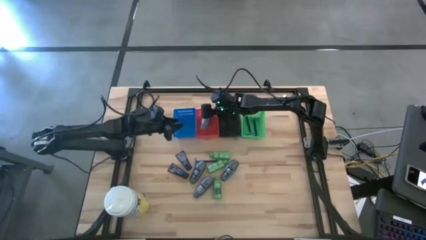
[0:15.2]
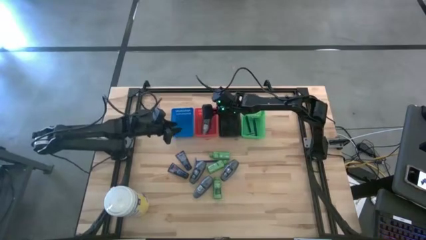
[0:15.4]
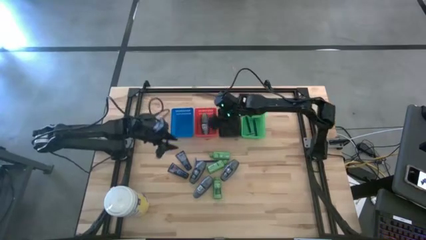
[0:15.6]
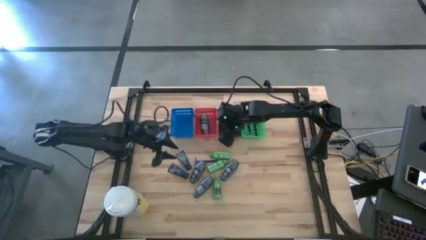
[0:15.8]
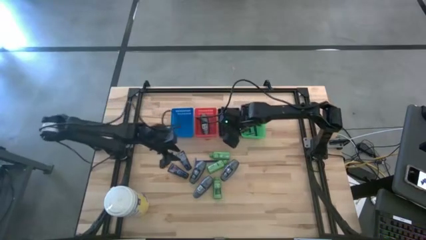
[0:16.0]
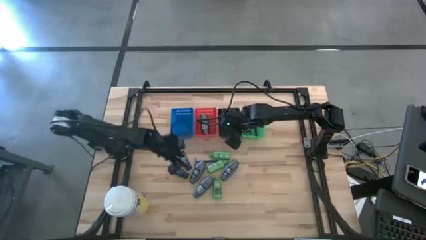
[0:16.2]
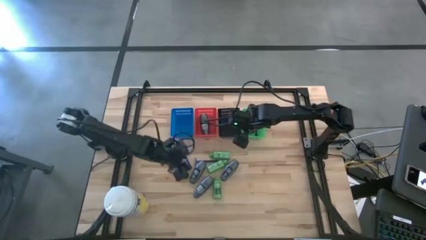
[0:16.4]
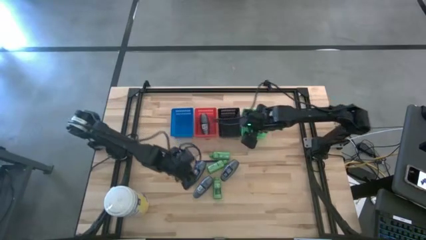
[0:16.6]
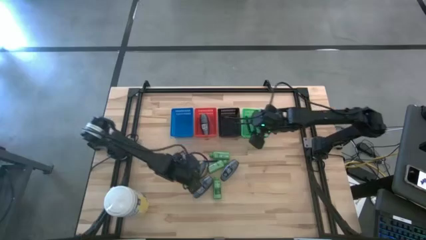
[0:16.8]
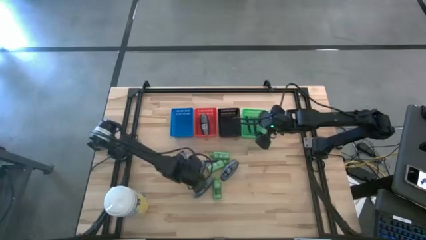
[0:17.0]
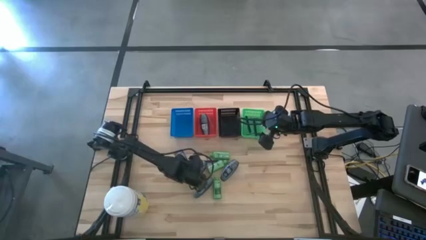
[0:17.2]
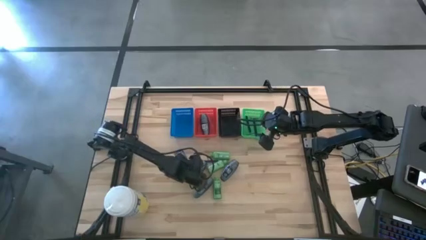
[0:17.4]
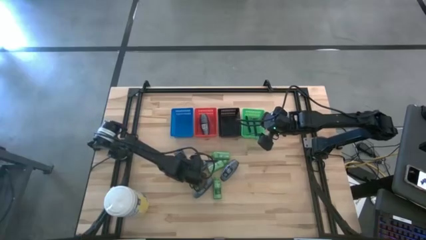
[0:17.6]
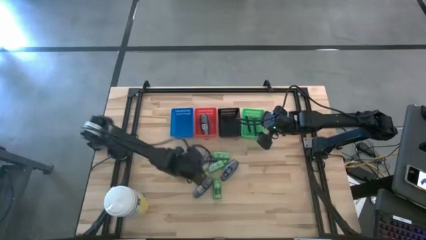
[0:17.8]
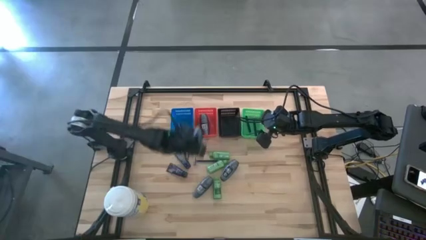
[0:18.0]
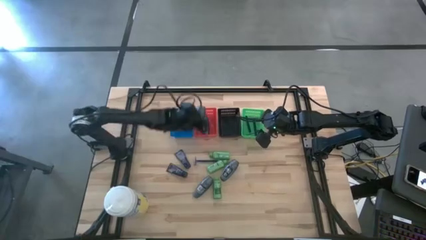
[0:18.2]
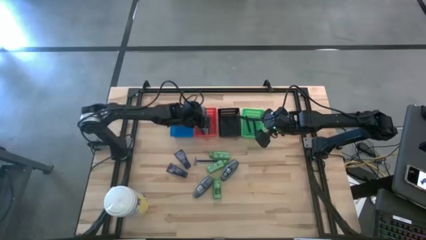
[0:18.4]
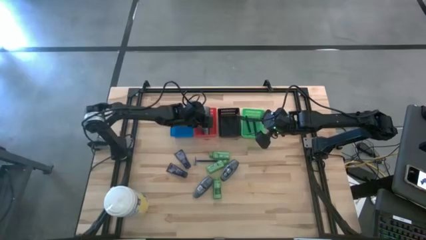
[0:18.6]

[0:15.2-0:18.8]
Task: Pick & Place Travel size toiletries
Put the gray deodorant into the red bin

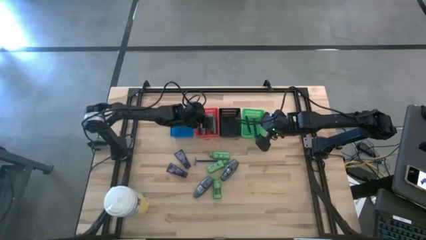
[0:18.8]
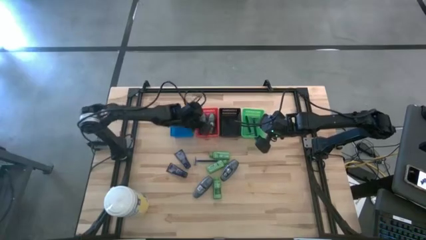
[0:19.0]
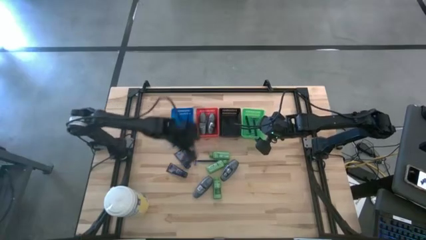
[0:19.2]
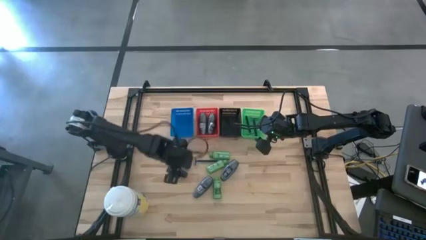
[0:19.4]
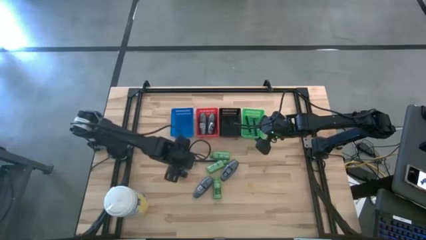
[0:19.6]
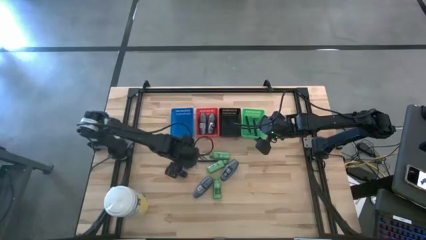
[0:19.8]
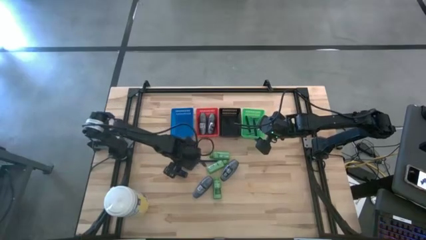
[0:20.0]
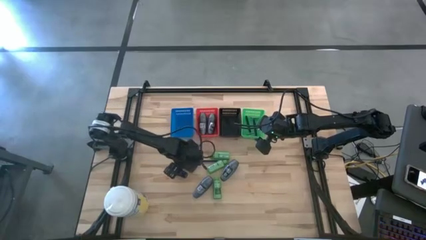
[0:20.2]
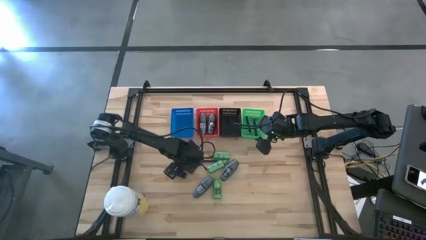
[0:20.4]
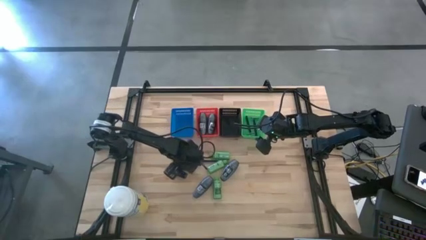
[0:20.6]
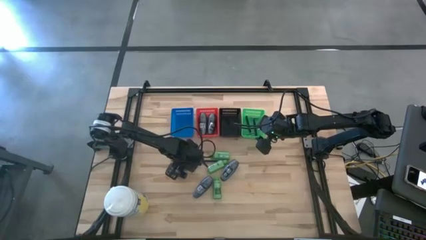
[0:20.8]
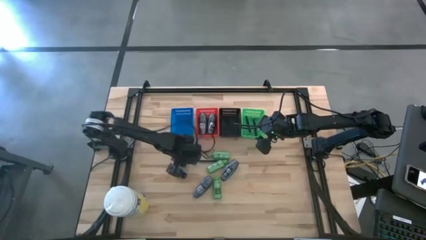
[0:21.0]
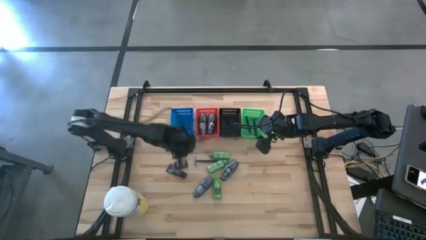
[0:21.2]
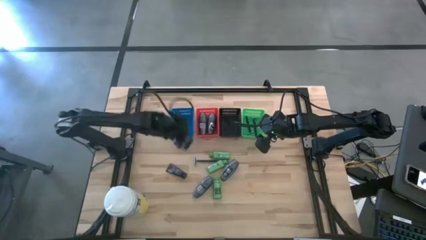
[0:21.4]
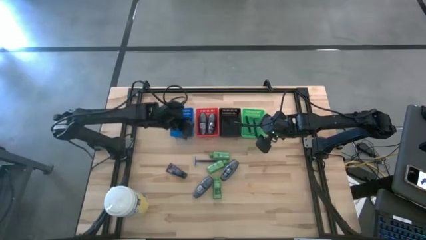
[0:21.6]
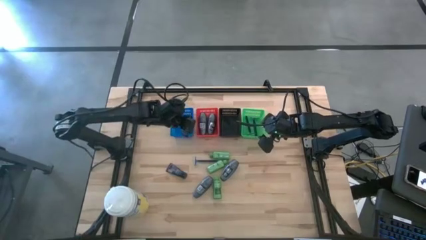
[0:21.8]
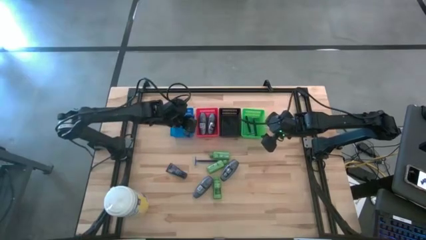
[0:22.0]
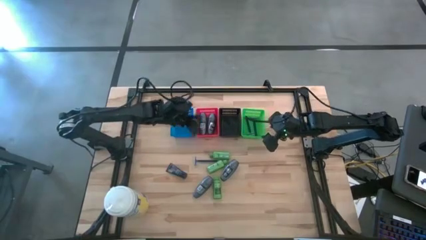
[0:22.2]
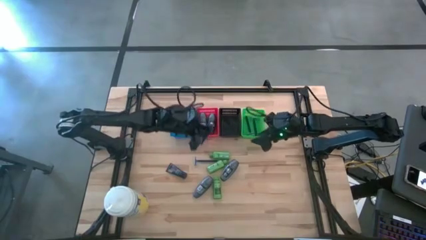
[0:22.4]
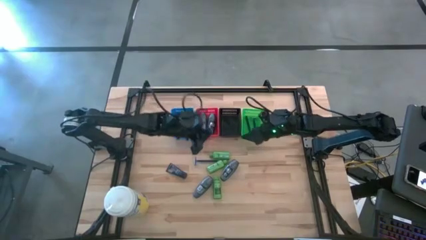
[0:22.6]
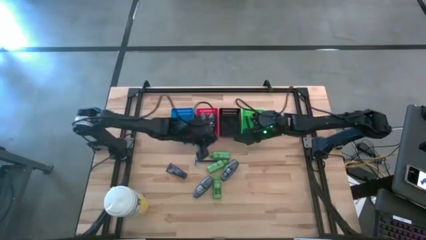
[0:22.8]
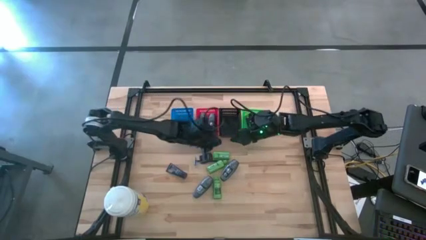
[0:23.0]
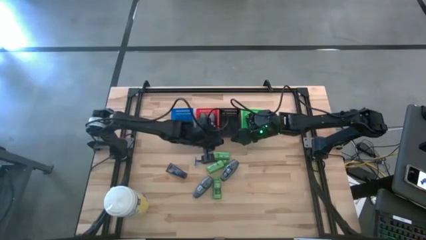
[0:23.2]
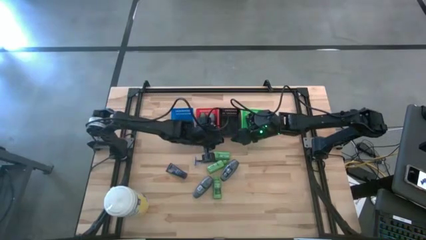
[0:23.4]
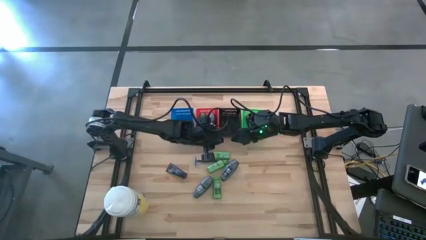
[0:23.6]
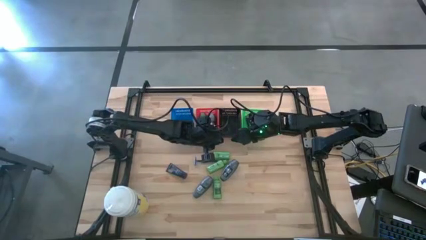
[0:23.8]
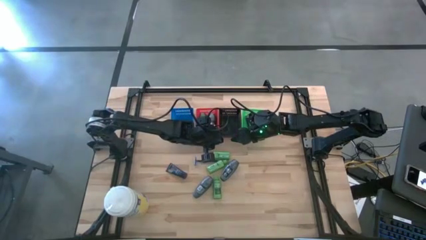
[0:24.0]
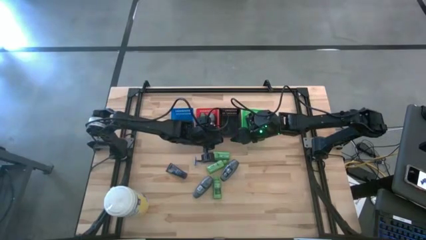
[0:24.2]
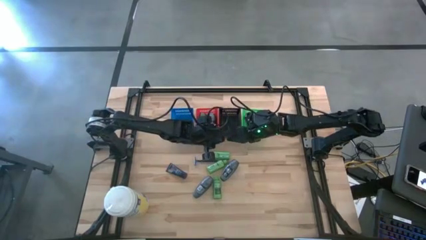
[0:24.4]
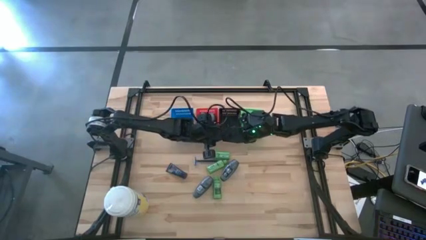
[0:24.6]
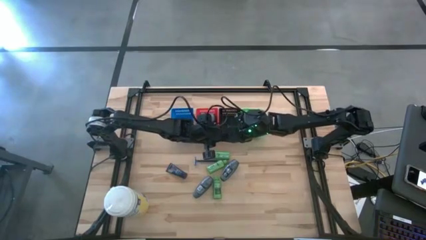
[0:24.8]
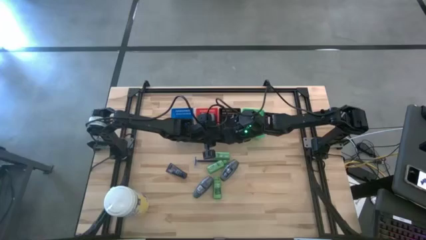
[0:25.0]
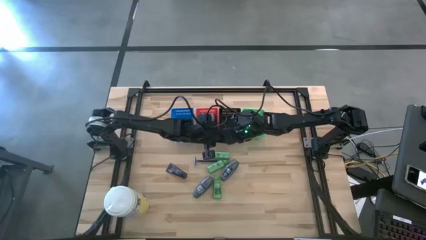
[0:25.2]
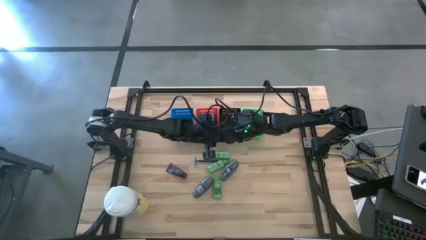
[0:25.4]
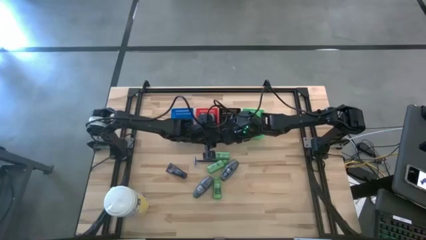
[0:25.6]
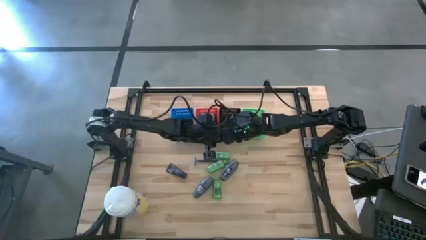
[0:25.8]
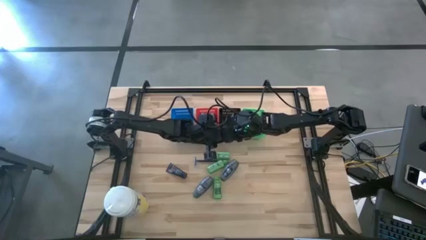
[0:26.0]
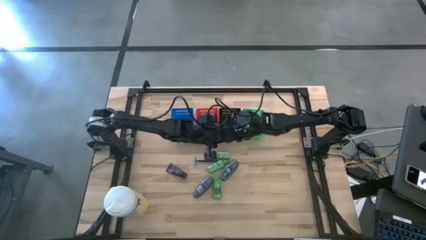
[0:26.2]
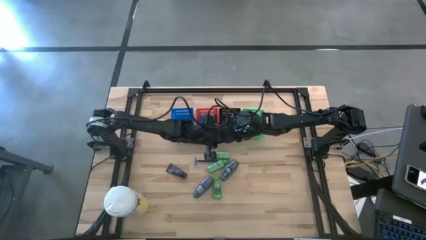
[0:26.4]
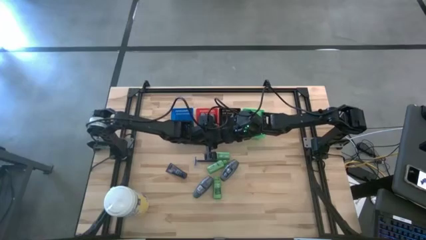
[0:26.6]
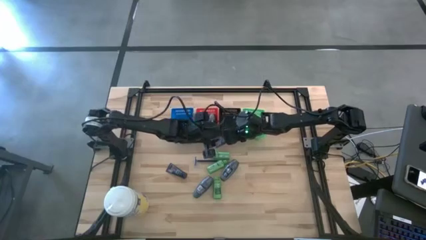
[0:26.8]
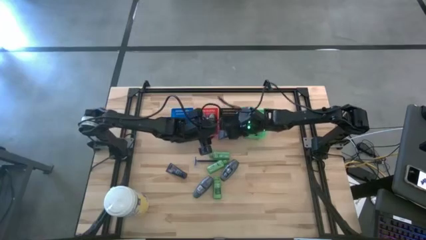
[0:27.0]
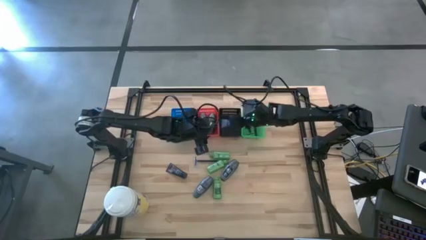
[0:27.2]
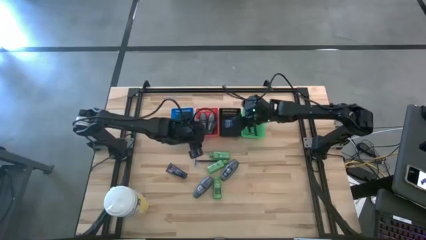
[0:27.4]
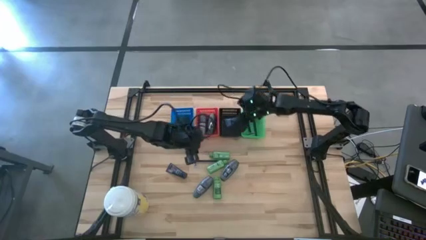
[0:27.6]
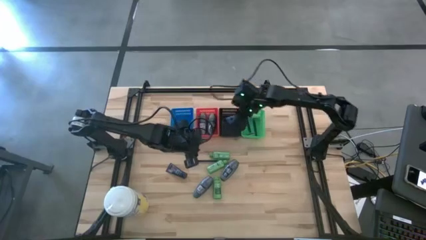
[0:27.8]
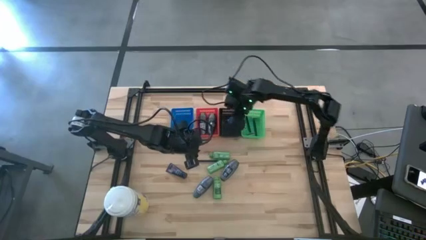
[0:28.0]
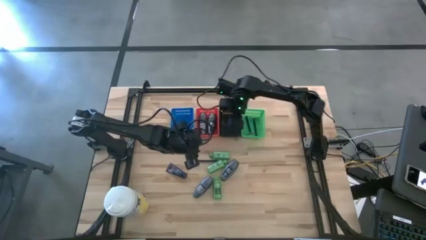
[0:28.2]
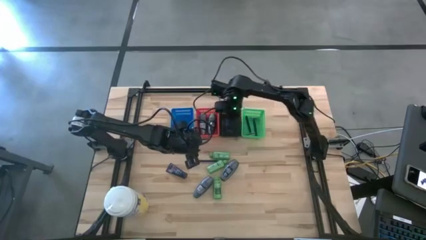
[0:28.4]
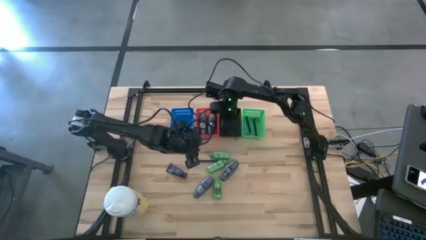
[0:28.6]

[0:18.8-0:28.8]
Put the blue shave cream into the black bin

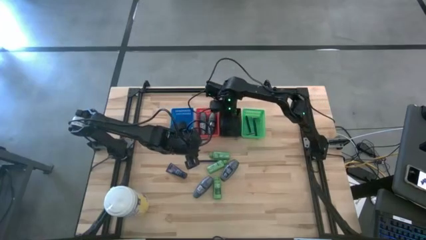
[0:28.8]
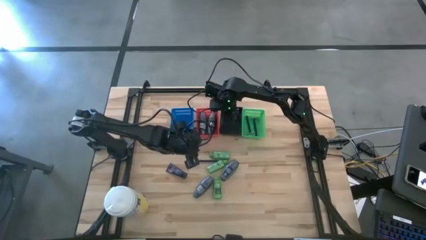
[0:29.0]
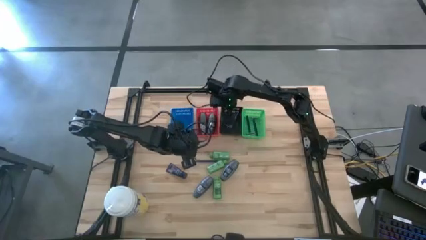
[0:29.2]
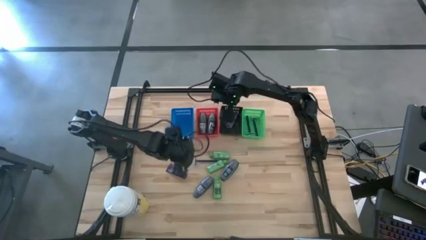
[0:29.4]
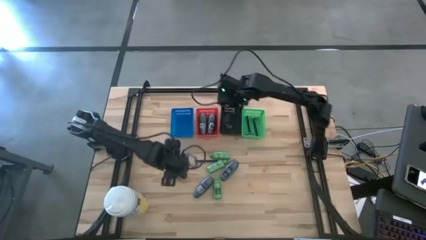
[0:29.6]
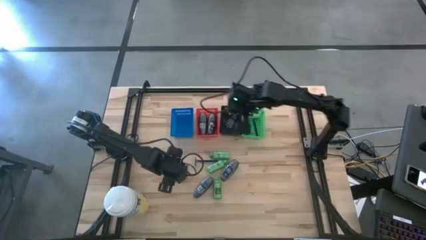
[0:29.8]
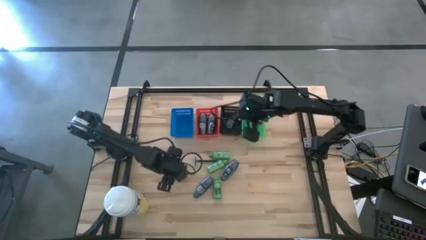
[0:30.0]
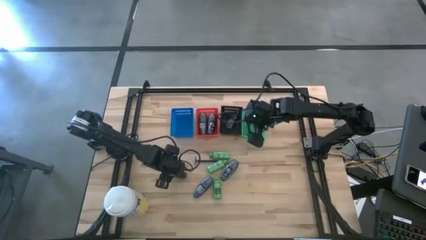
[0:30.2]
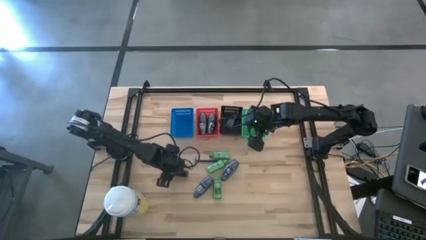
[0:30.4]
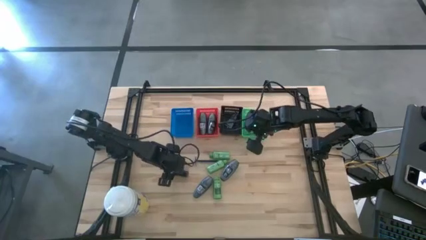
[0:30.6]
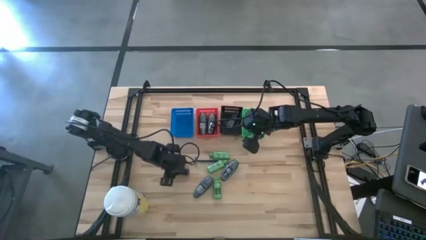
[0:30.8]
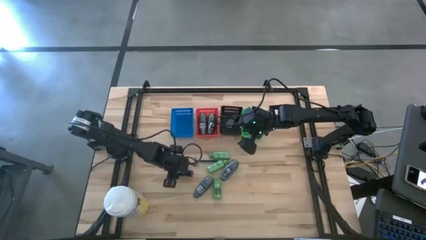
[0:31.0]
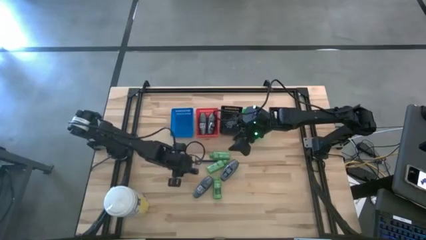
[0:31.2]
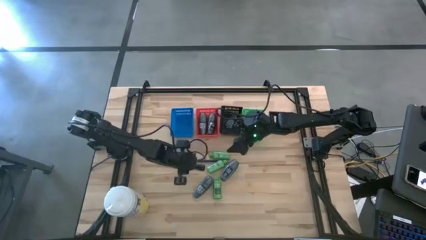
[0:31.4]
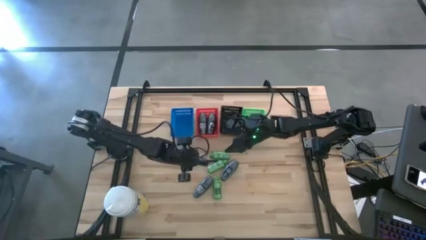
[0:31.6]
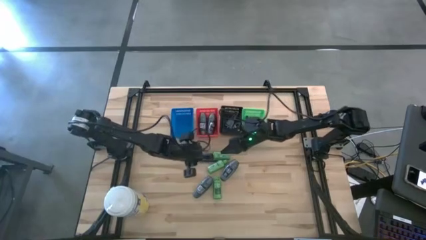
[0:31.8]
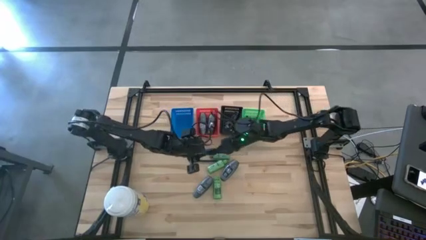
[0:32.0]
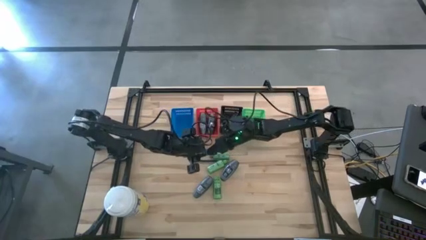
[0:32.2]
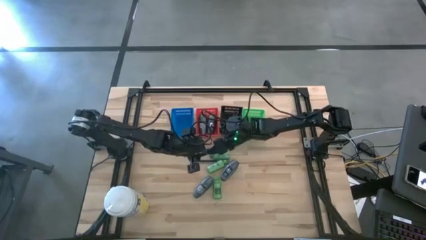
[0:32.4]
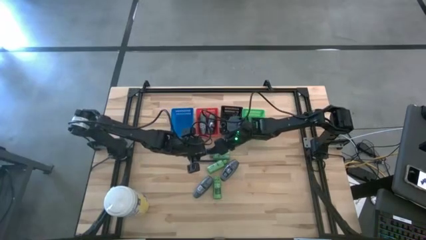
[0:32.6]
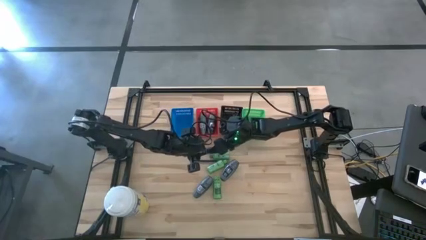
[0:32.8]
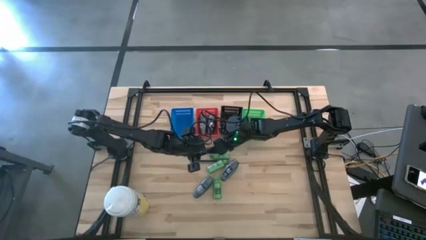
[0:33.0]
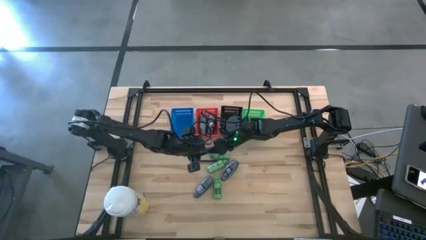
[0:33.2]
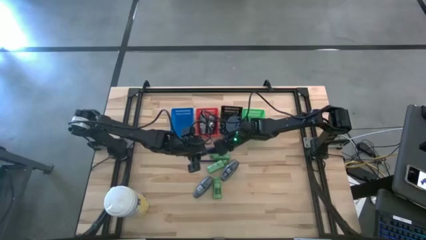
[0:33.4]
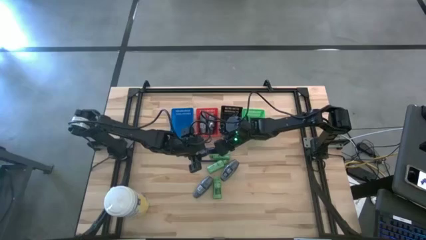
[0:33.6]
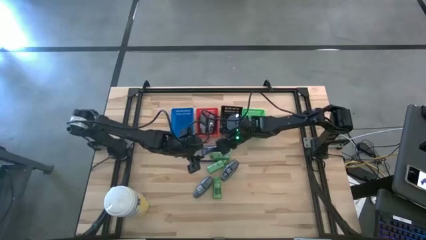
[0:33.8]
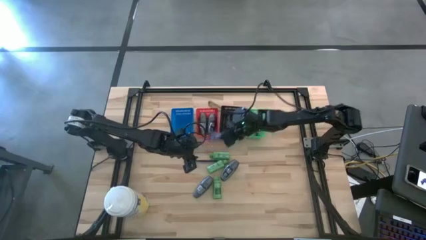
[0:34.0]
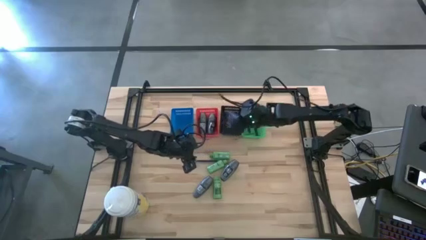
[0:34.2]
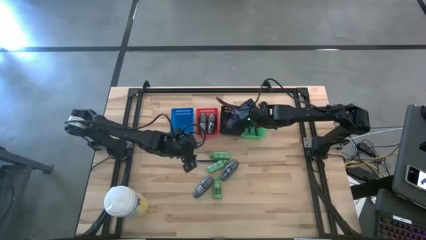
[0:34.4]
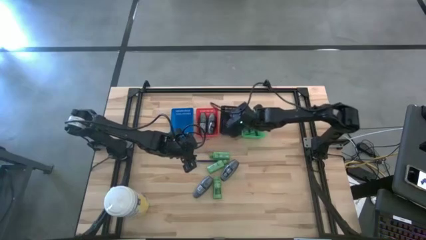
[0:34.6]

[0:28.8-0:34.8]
Put the blue shave cream into the black bin
